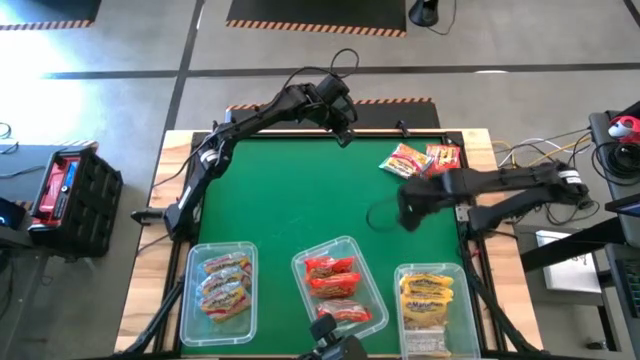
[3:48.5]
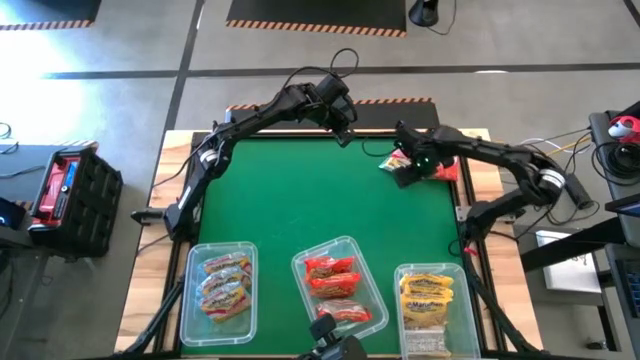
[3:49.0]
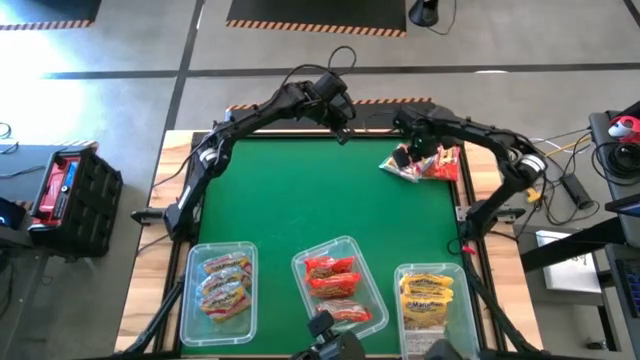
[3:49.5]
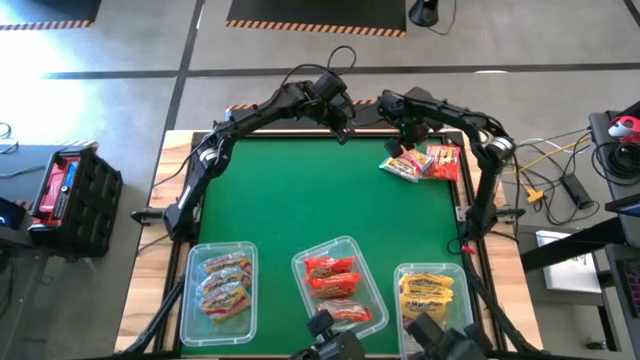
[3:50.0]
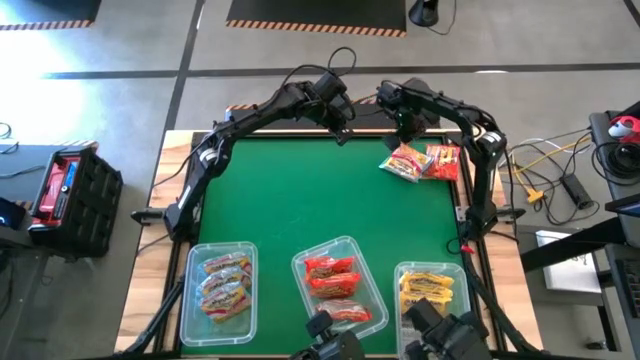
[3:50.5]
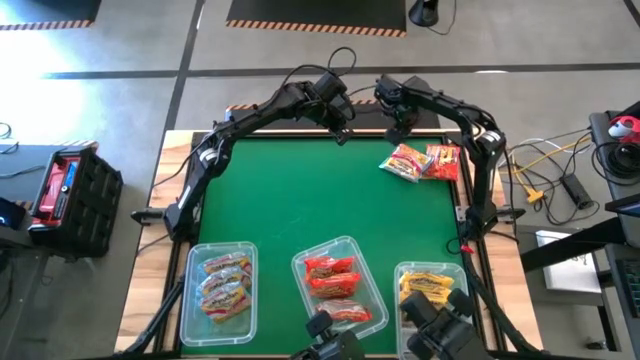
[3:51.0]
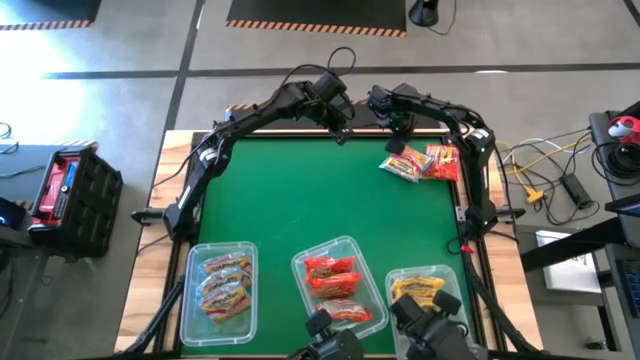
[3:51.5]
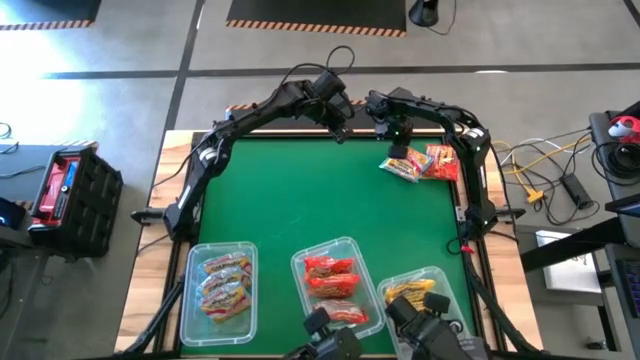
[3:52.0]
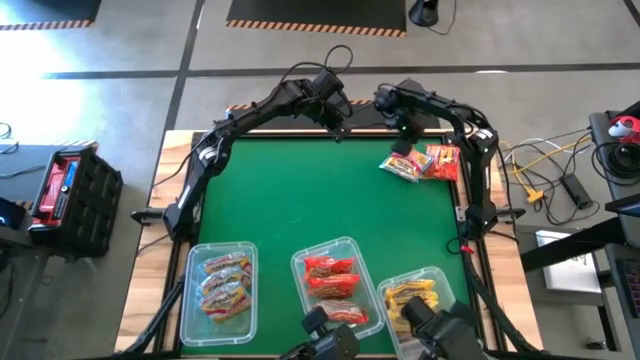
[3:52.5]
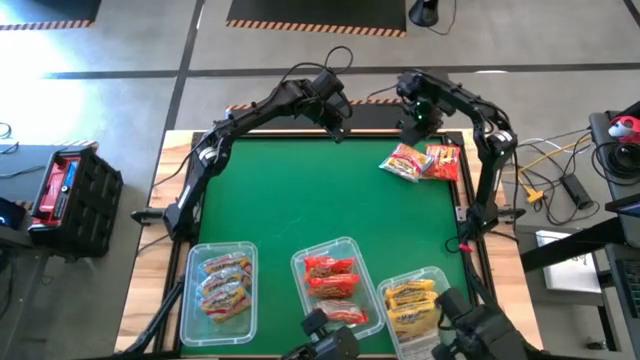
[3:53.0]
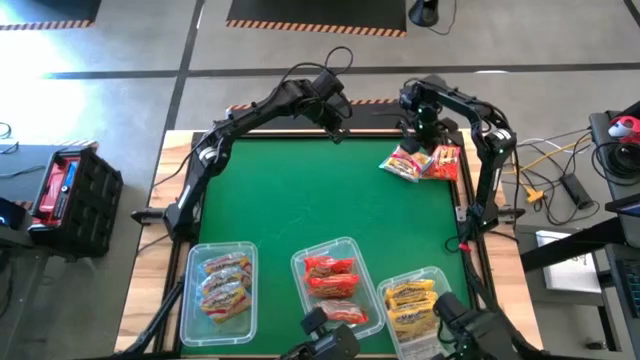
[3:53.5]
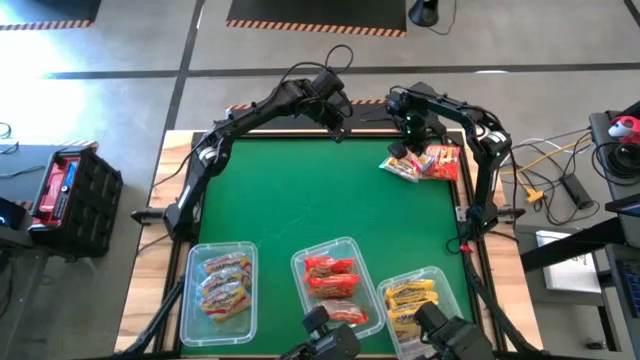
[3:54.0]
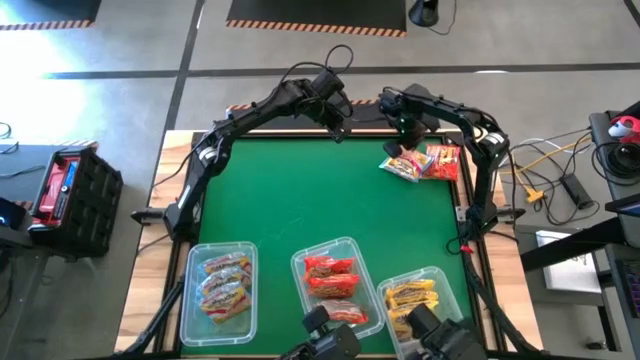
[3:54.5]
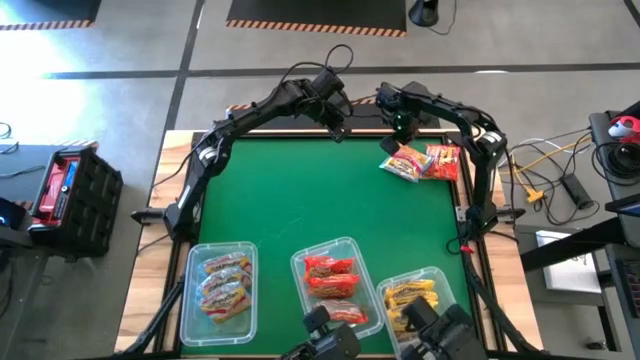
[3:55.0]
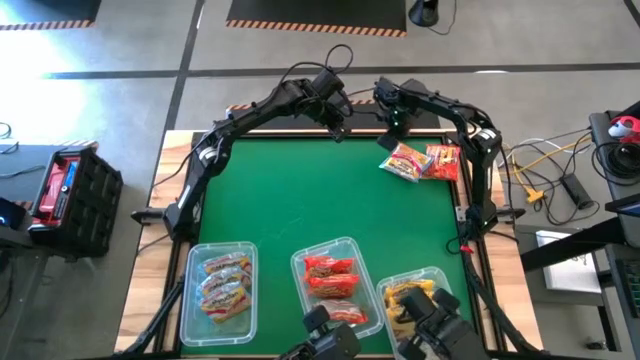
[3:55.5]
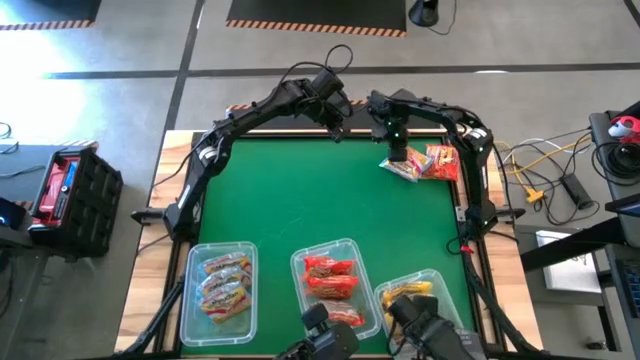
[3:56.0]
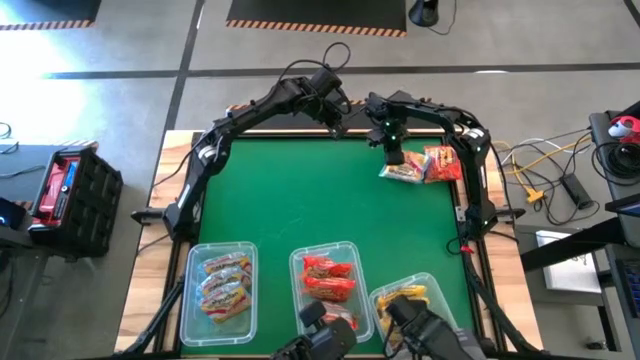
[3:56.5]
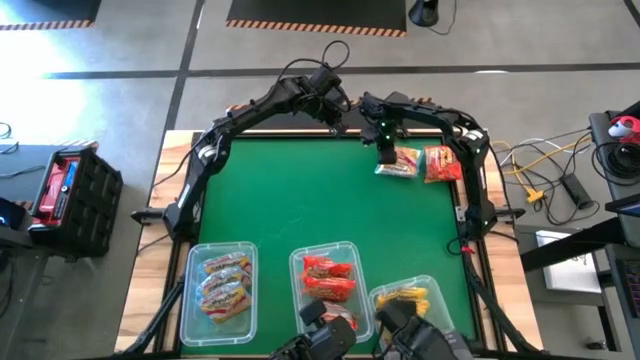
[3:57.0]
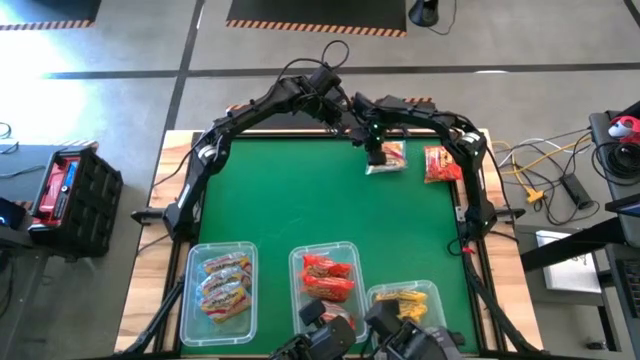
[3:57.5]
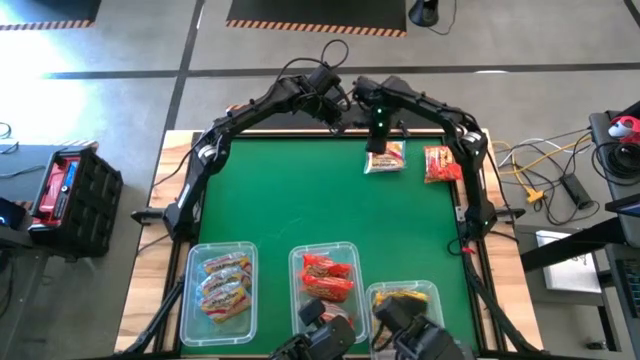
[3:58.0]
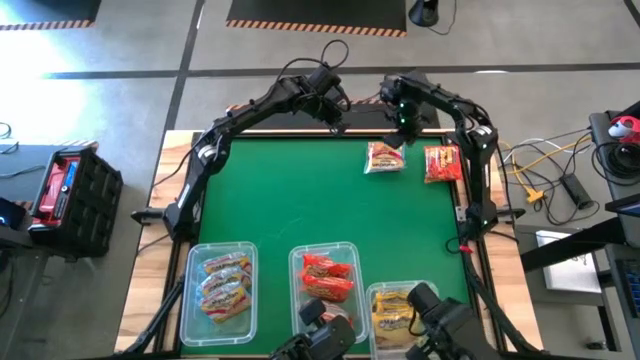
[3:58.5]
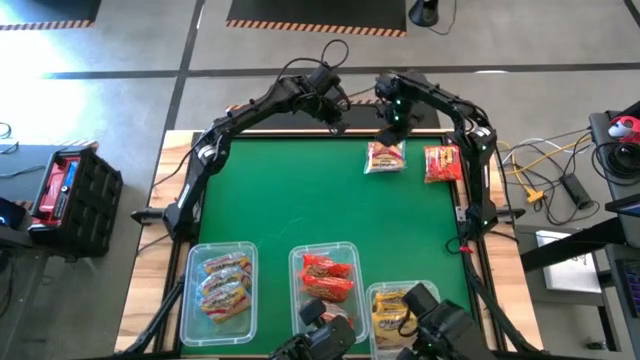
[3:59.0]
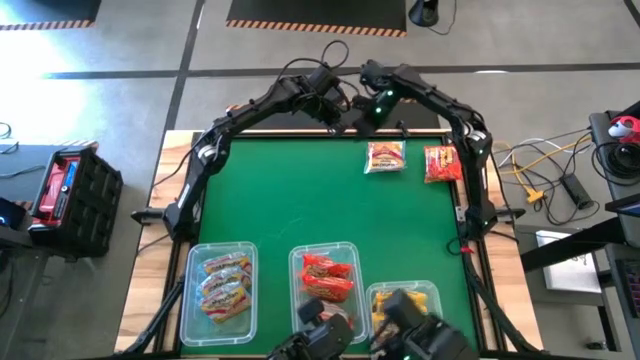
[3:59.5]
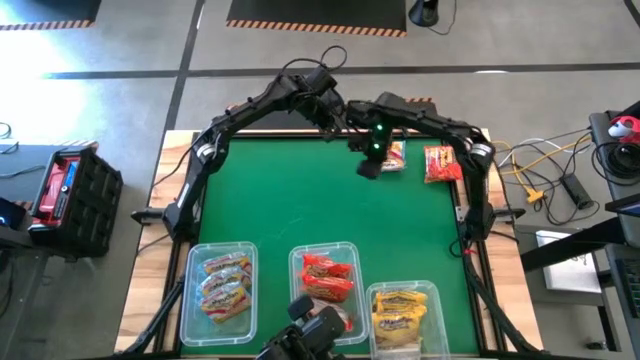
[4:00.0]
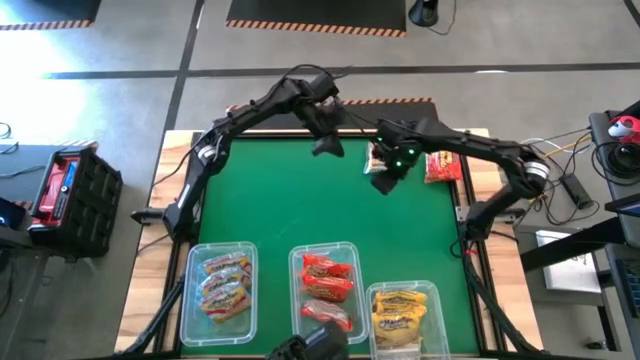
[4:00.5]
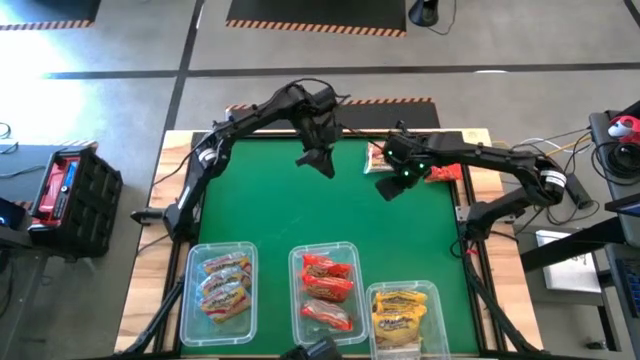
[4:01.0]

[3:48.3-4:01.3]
Task: Sort Maruchan noodles
Put the blue noodle pack into the left transparent bin

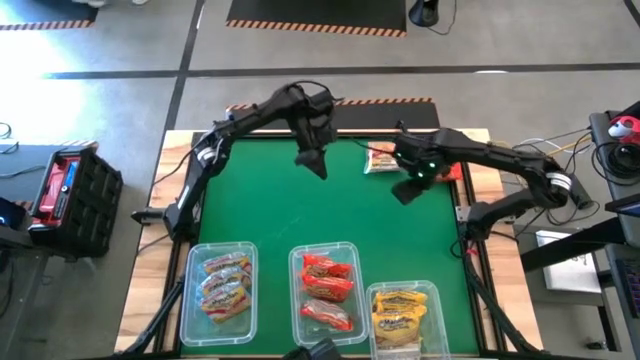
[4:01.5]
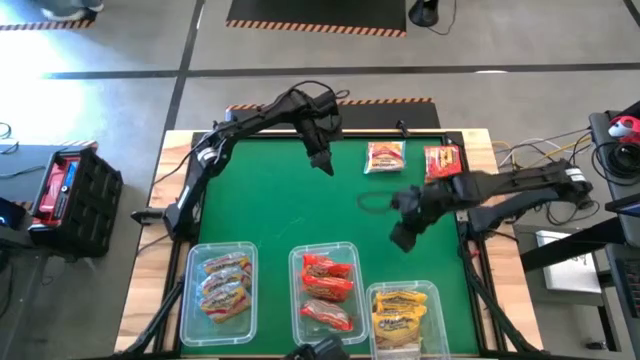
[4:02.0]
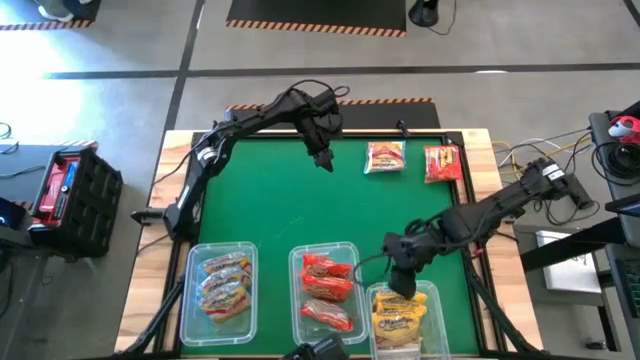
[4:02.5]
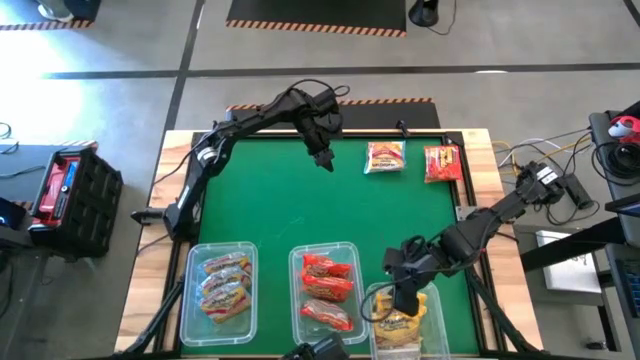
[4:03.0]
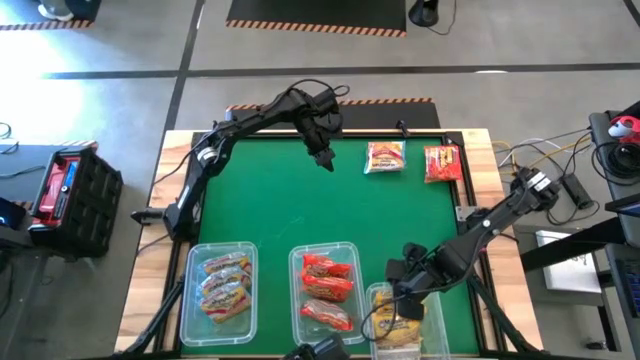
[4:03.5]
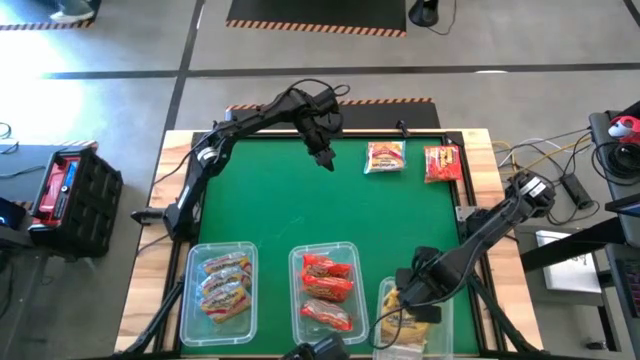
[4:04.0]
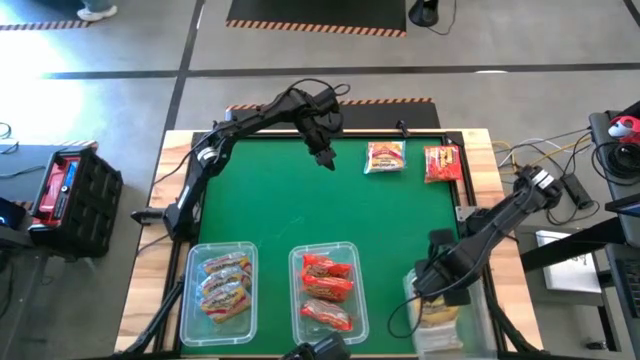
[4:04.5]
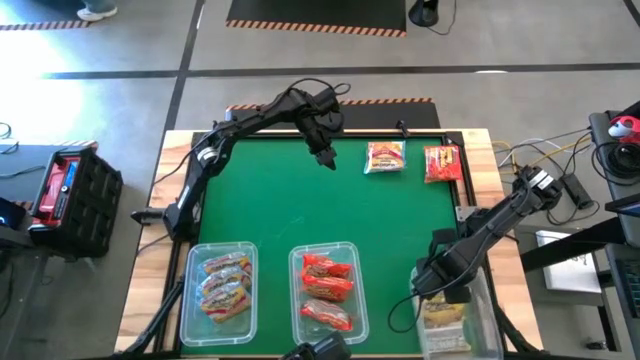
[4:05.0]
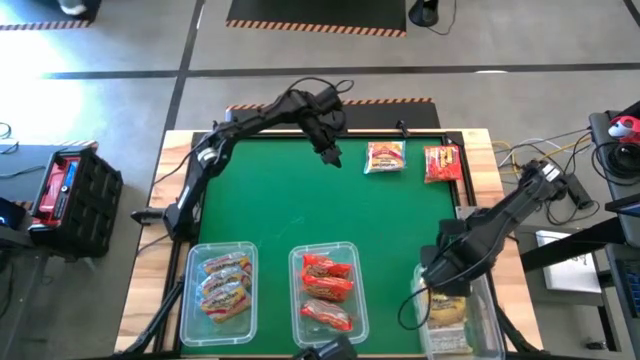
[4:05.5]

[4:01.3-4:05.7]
Adjust the right transparent bin

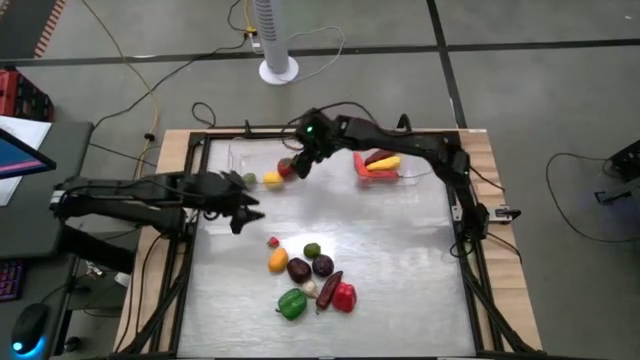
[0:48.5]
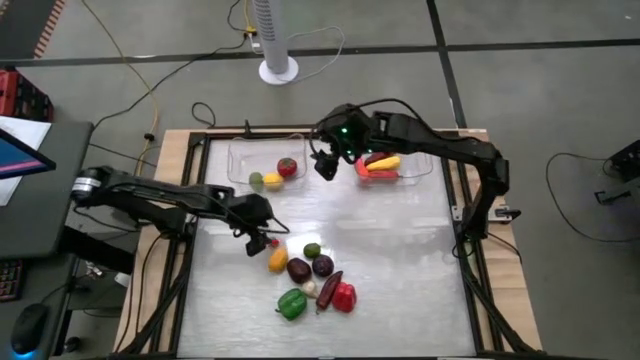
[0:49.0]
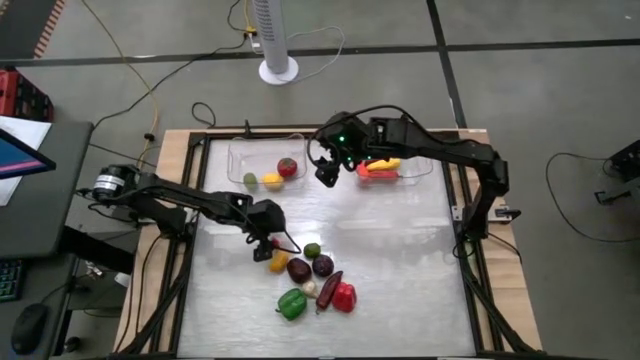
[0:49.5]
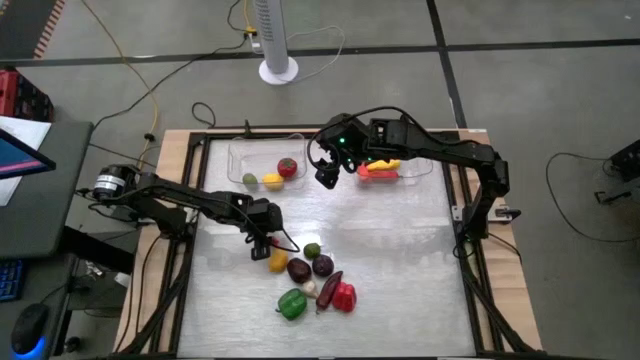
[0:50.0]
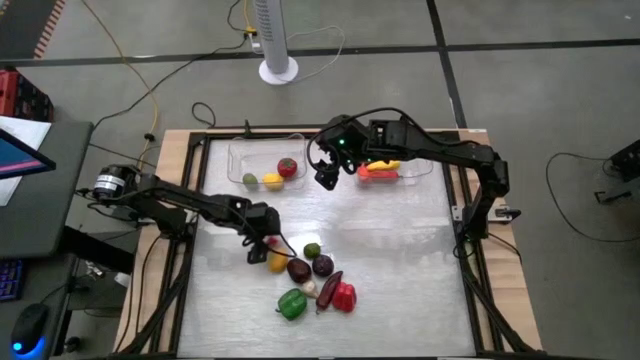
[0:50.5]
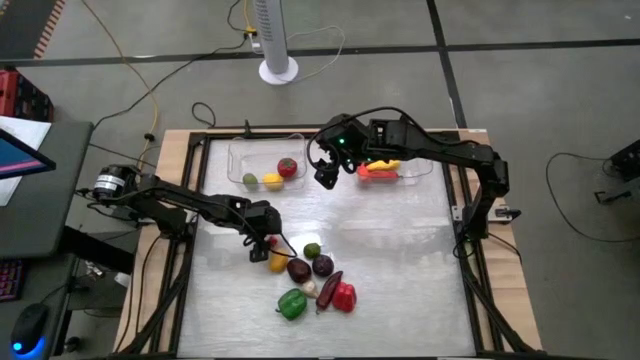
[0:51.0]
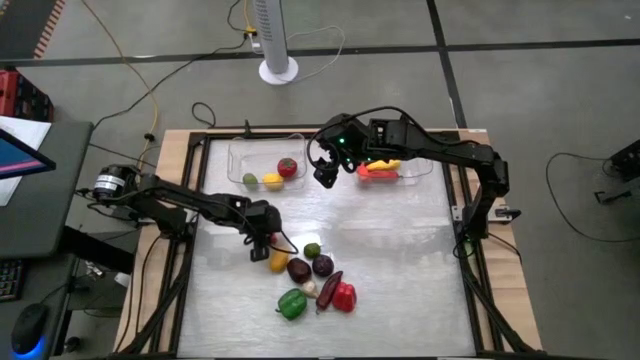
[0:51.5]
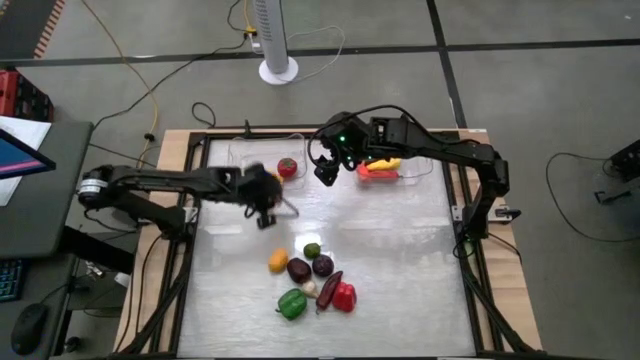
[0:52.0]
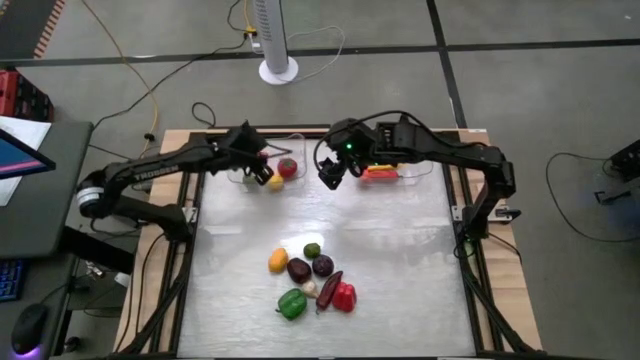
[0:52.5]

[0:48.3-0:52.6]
Task: Sort produce into baskets
Put the orange tomato into the left transparent bin
